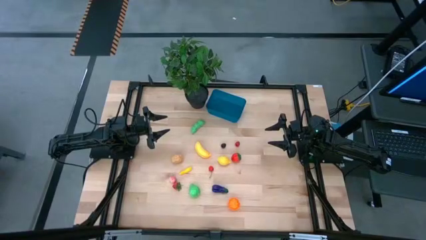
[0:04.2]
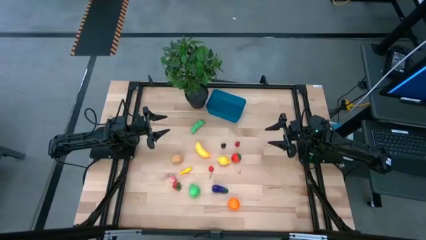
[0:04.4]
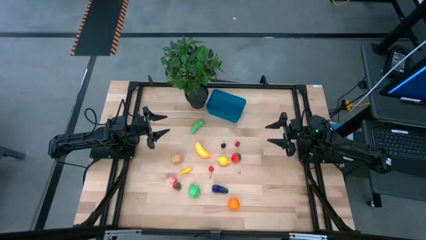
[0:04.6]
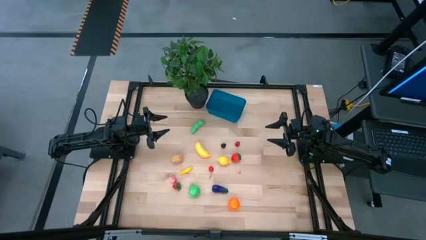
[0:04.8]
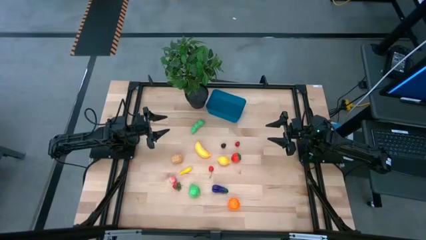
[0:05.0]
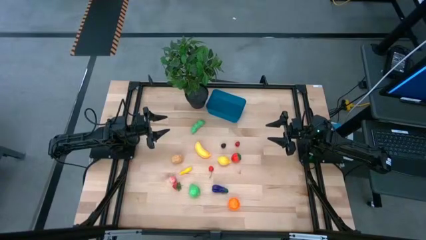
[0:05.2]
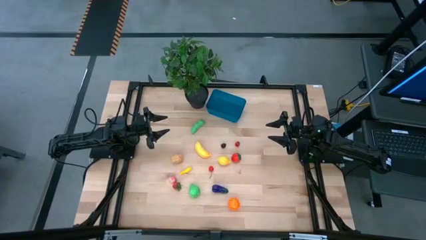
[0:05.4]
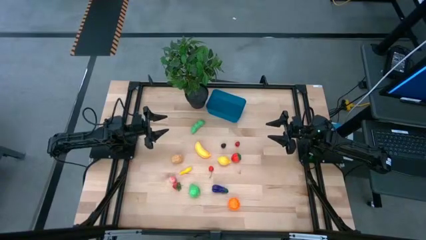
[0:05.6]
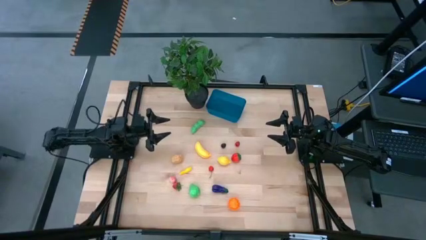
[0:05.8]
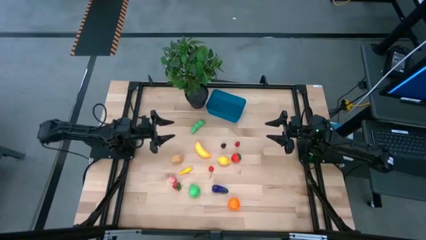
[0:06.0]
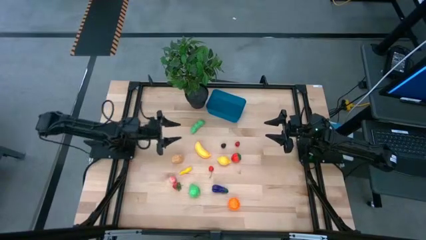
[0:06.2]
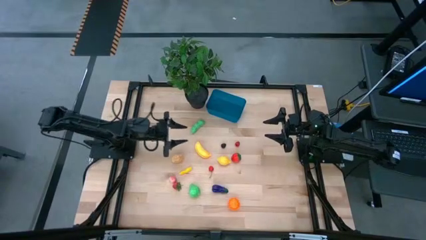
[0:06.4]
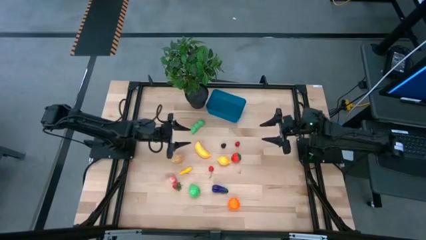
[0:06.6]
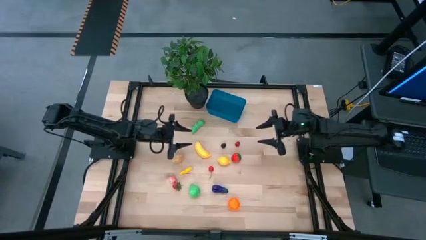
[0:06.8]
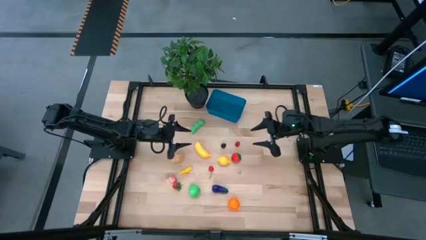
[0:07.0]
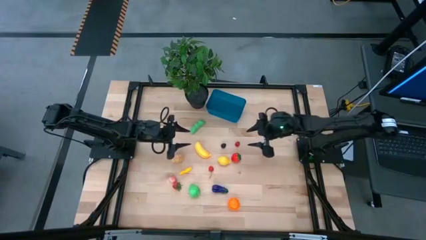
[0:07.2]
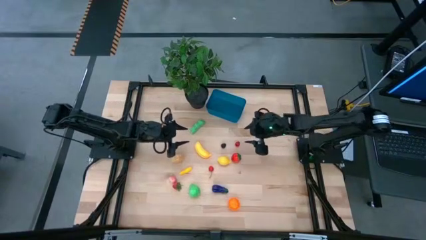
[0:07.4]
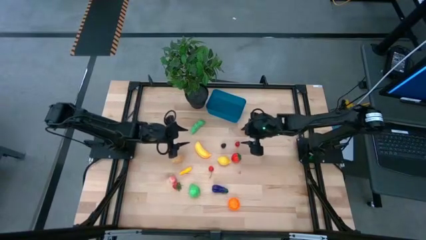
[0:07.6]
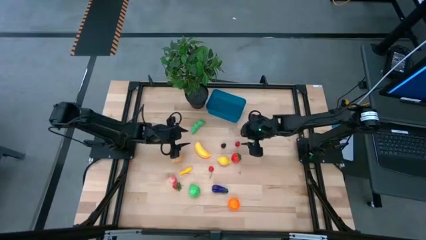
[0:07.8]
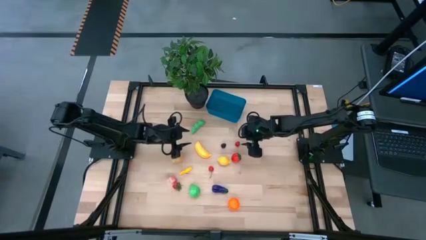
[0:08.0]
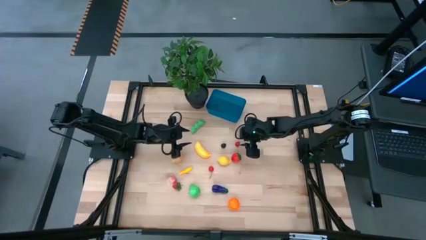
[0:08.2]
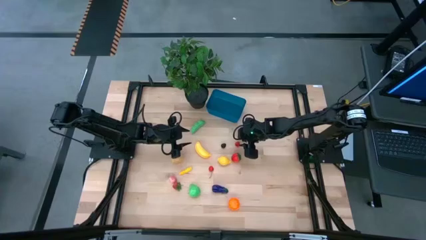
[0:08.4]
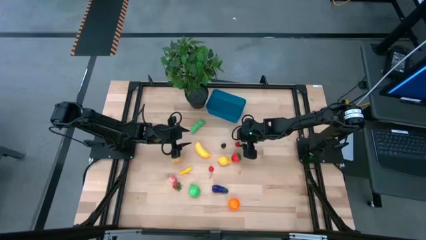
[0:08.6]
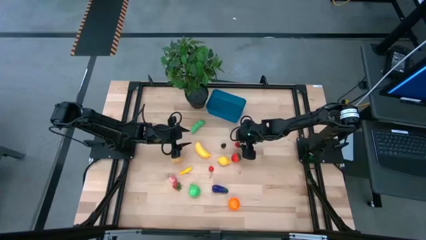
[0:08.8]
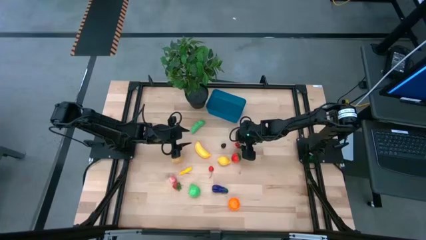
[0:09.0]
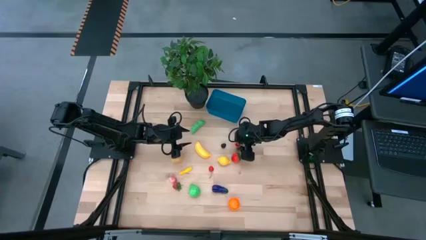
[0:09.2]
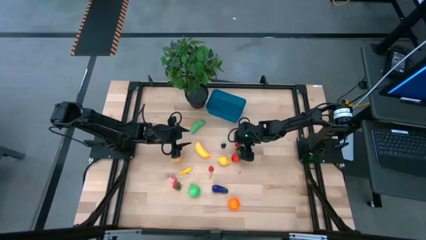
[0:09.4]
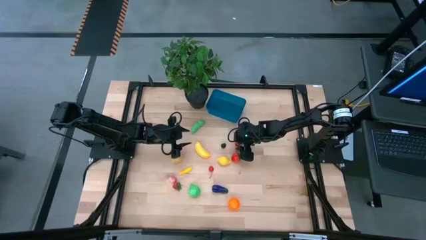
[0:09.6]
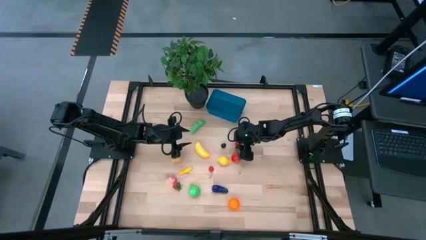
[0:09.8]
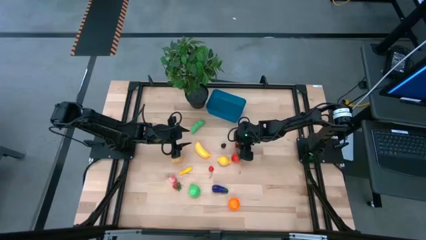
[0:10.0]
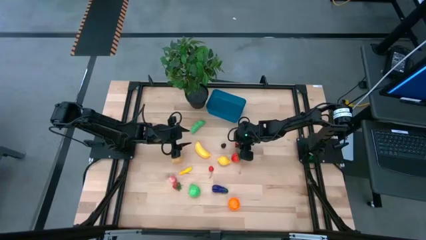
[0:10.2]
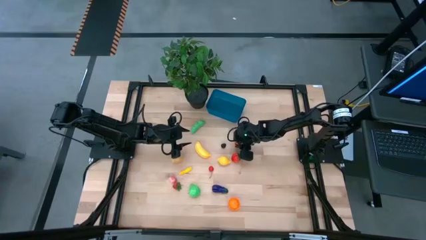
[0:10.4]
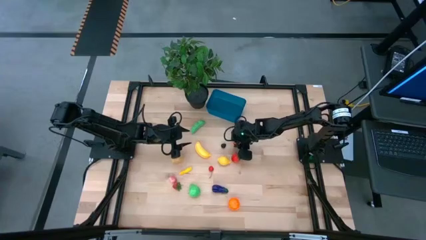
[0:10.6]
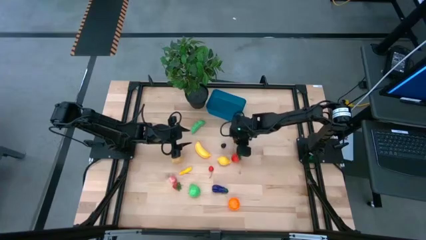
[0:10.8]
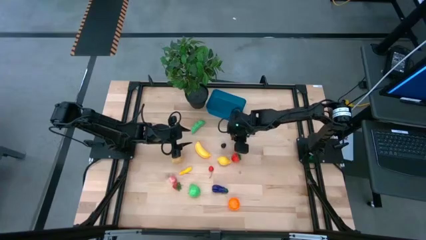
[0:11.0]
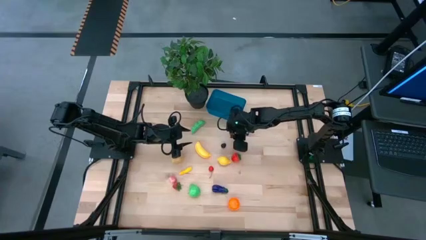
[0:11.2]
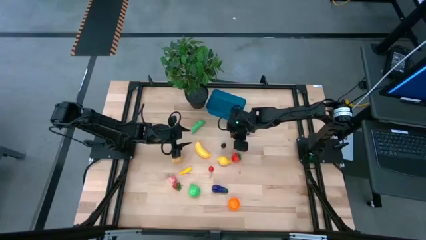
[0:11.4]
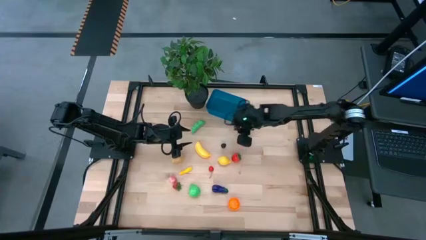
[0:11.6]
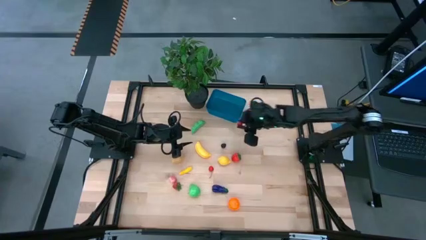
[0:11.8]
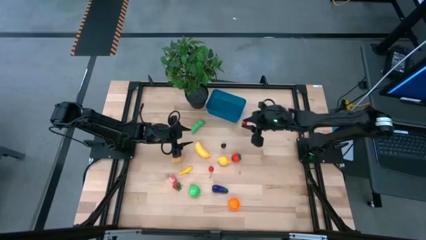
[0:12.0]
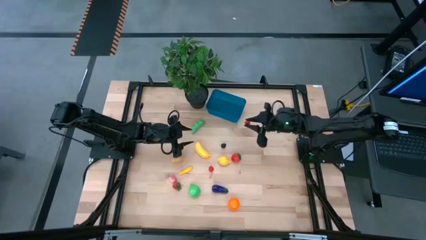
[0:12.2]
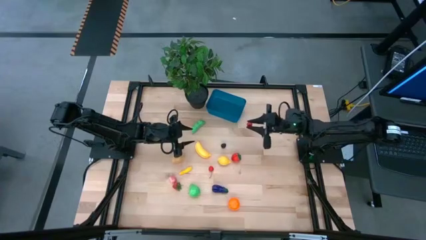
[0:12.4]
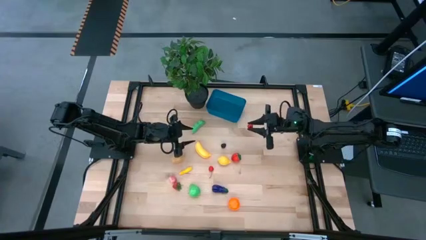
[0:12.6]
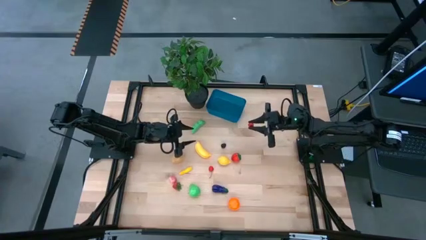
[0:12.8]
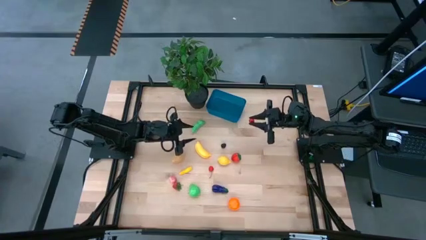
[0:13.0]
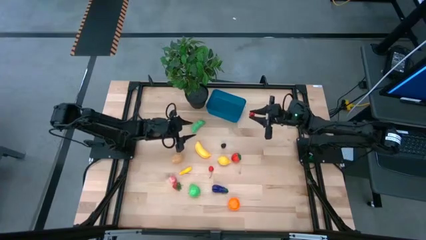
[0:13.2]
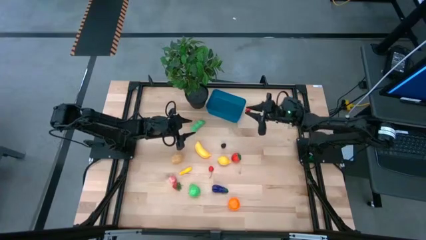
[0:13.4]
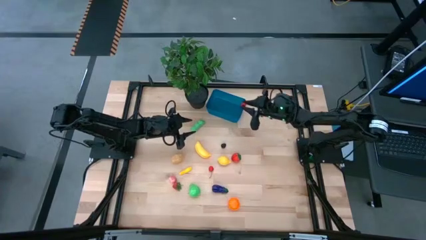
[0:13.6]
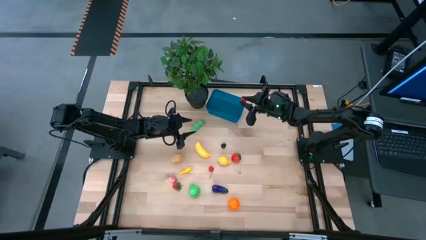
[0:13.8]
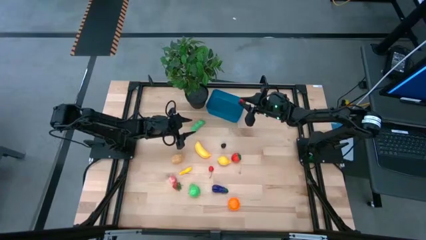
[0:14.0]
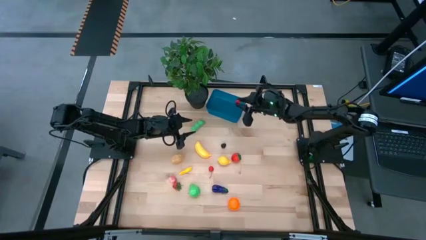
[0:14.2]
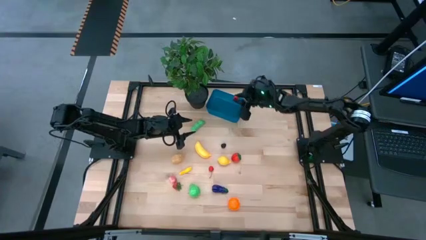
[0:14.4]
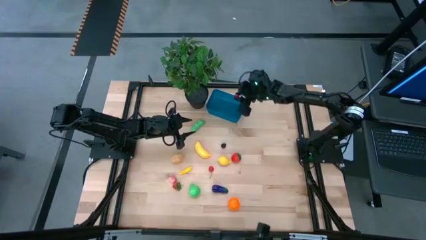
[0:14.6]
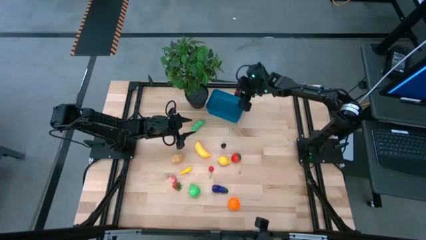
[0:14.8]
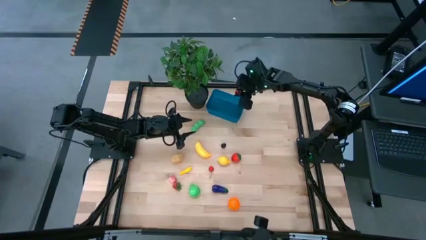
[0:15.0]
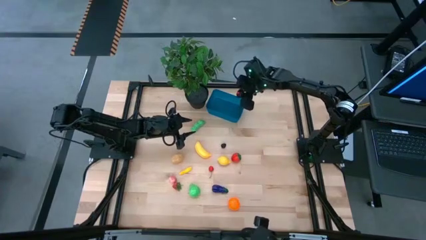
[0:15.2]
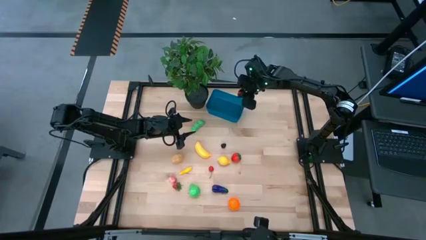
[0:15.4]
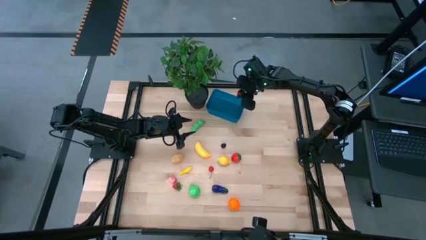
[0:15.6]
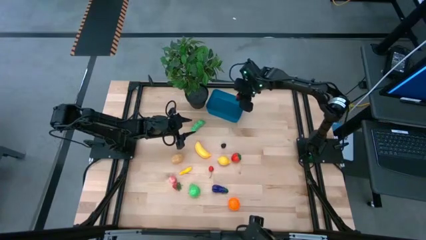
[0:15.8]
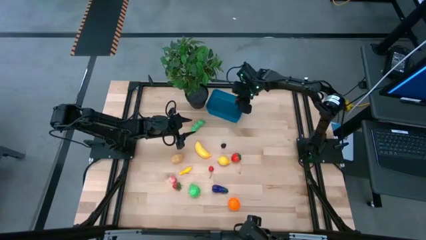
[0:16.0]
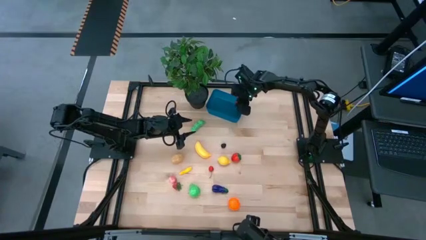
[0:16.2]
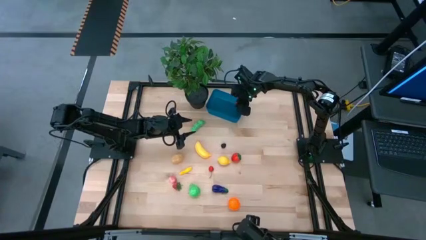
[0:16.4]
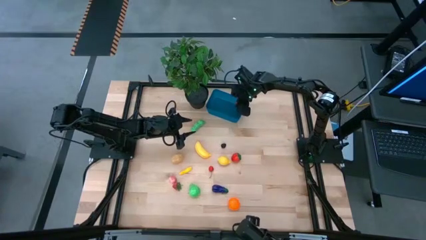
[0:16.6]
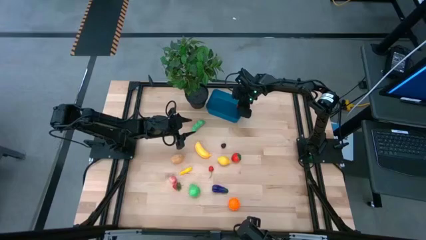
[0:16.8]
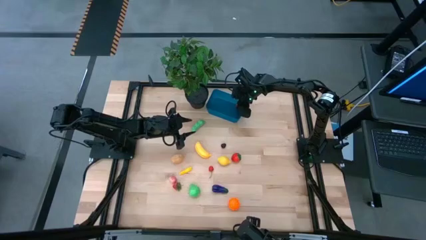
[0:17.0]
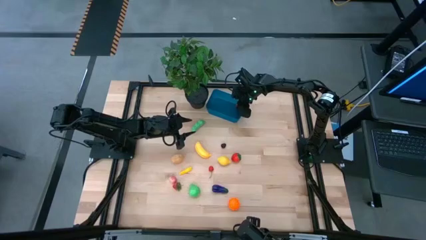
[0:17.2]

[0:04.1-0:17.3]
Task: Pick and placing Produce into tupperware
Put the red raspberry into the blue container
